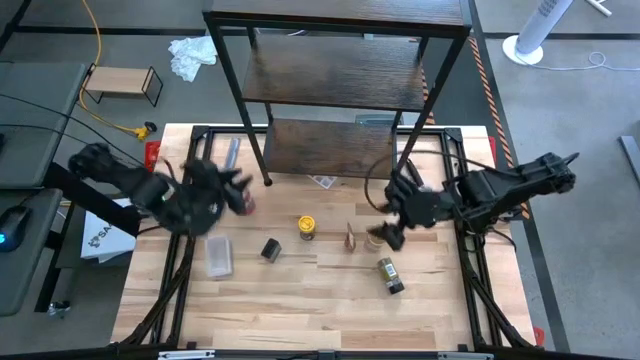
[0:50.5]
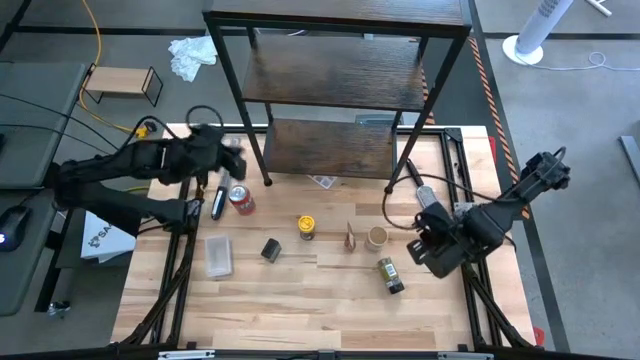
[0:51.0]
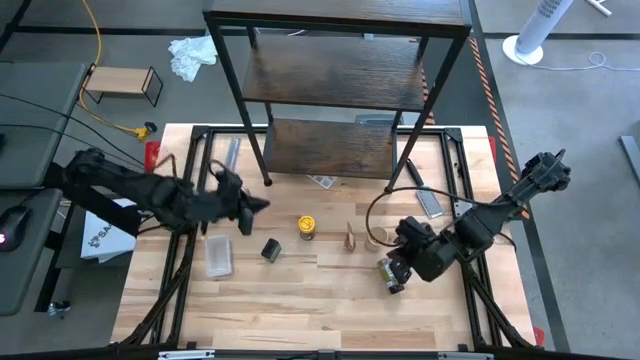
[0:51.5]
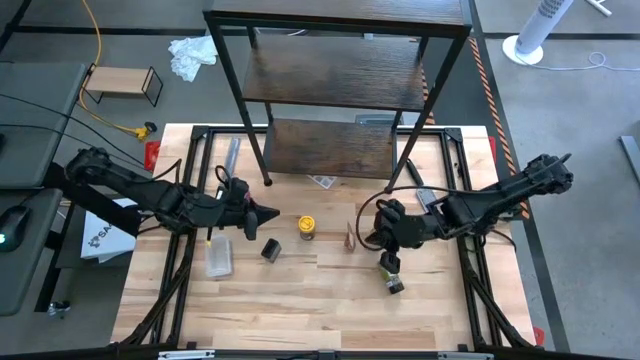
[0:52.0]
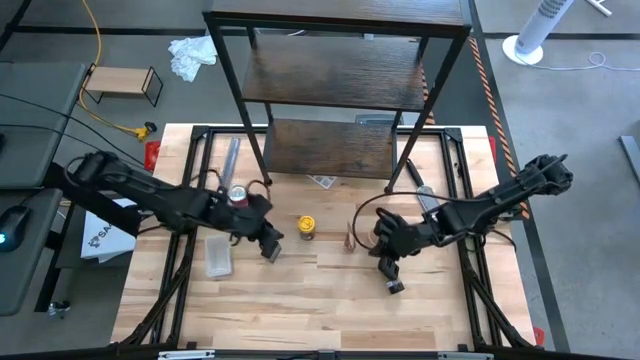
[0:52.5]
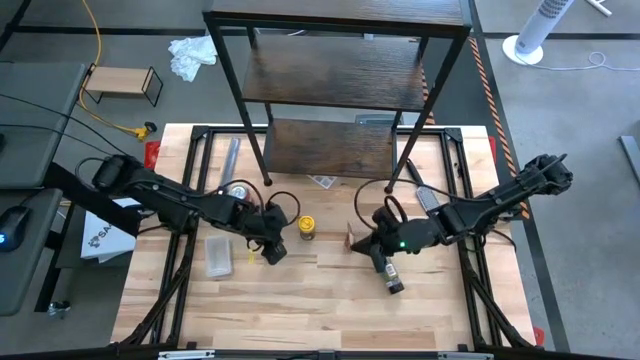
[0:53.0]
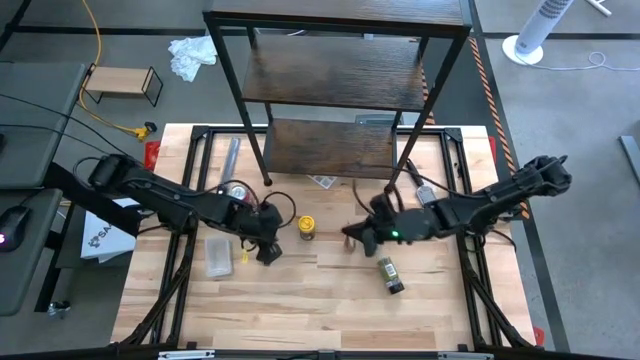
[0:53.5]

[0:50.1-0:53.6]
Task: Shelf spices
Adjust the black seasoning box

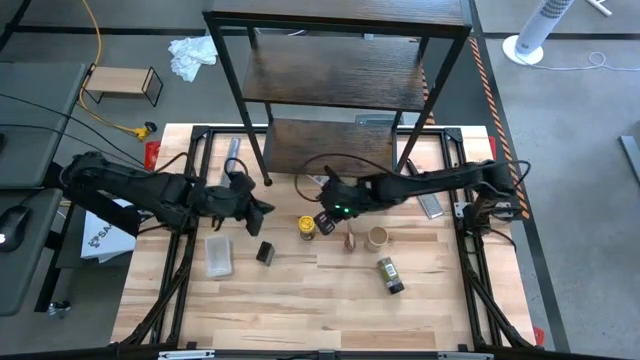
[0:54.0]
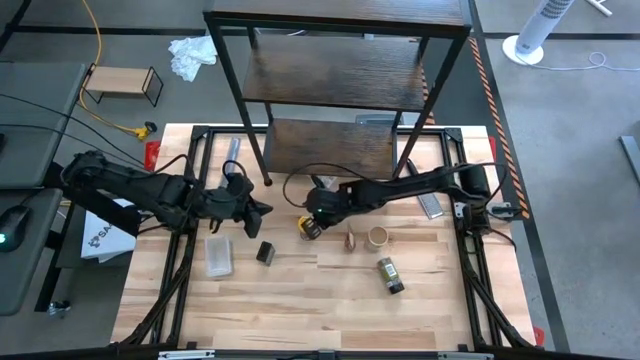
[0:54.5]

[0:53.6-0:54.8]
Adjust the yellow seasoning bag

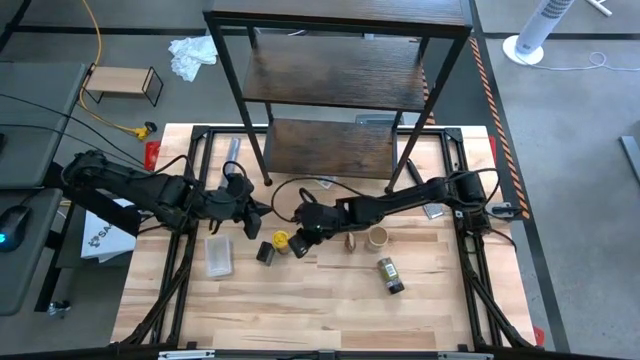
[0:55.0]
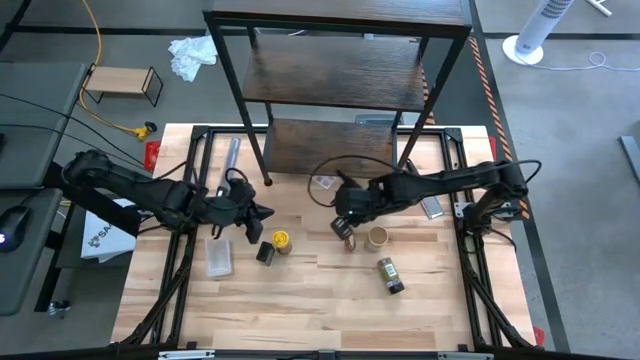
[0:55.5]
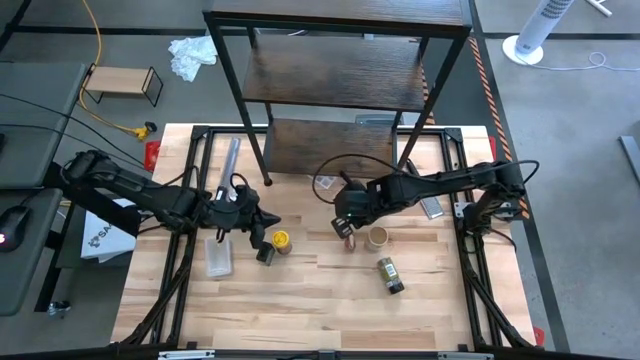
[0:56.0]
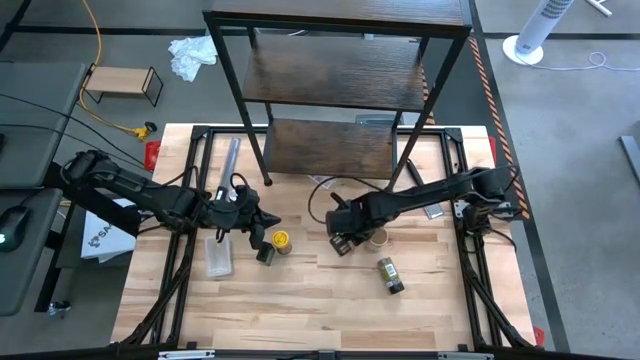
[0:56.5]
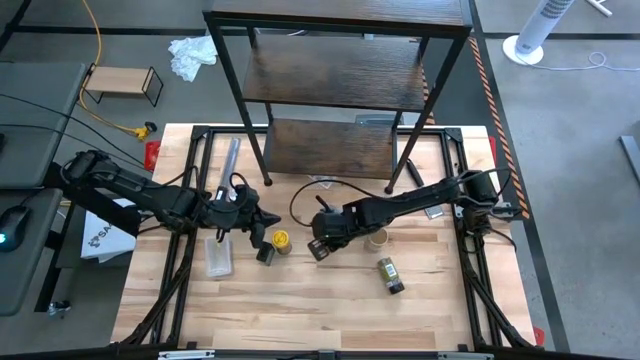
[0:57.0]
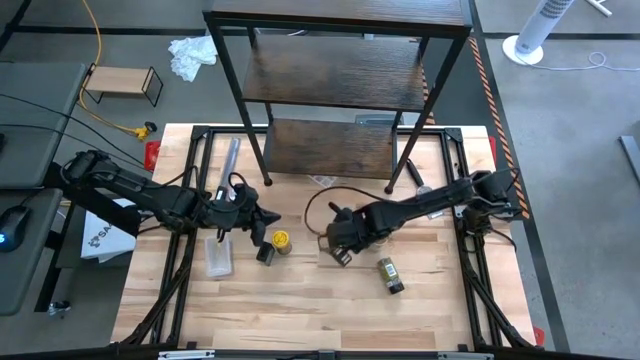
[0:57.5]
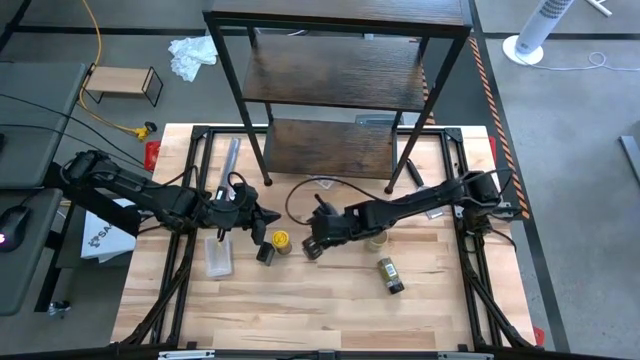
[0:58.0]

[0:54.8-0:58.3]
Adjust the seasoning bag

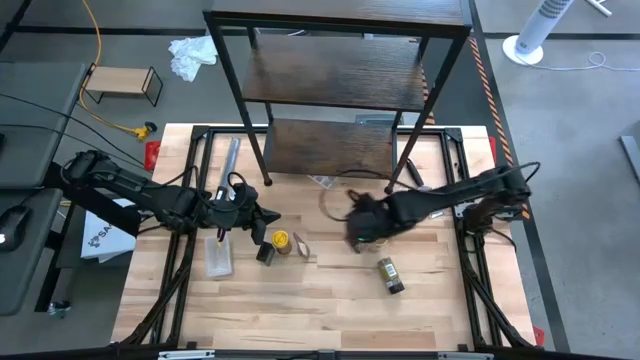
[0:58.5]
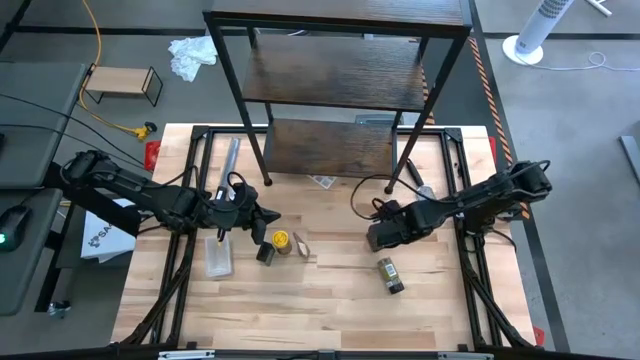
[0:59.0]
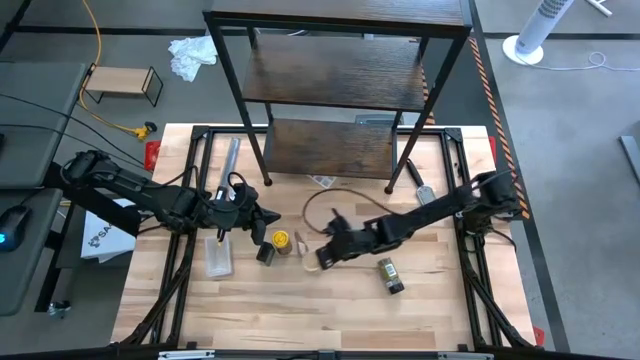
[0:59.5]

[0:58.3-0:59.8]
Move the brown seasoning bottle to the middle left of the table

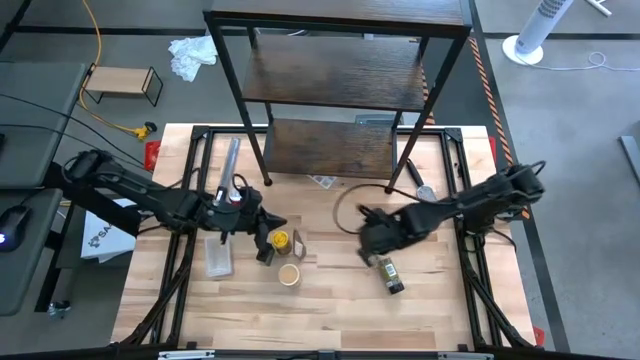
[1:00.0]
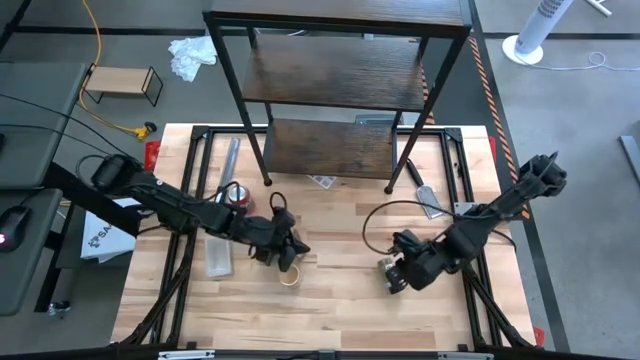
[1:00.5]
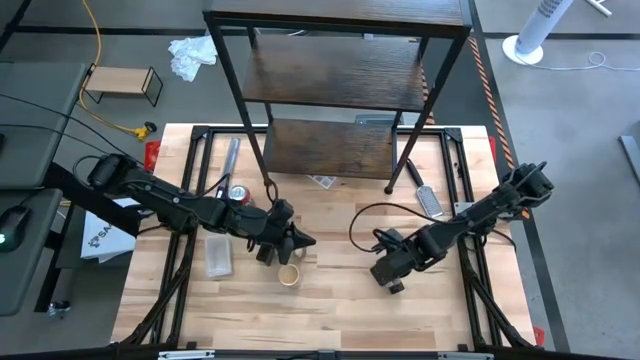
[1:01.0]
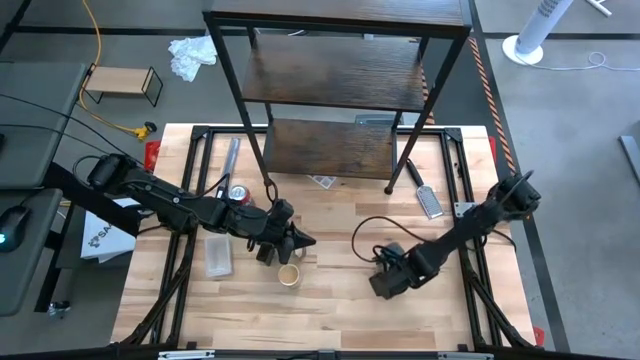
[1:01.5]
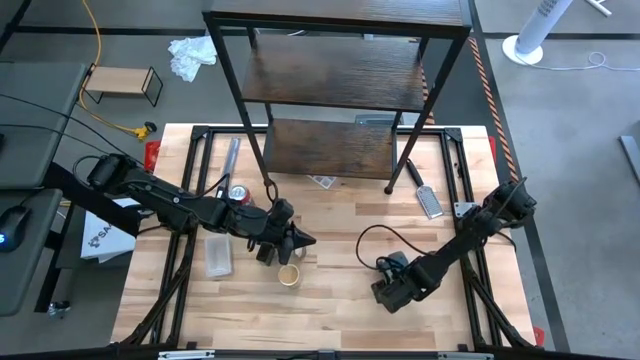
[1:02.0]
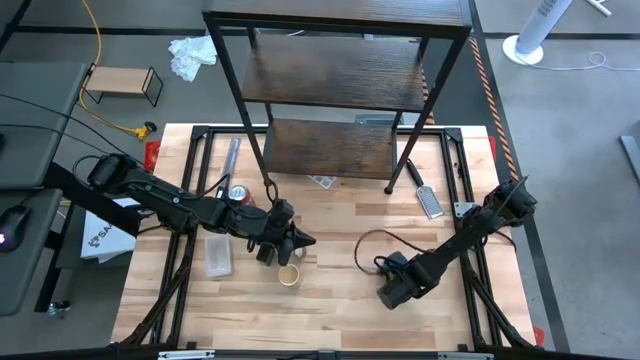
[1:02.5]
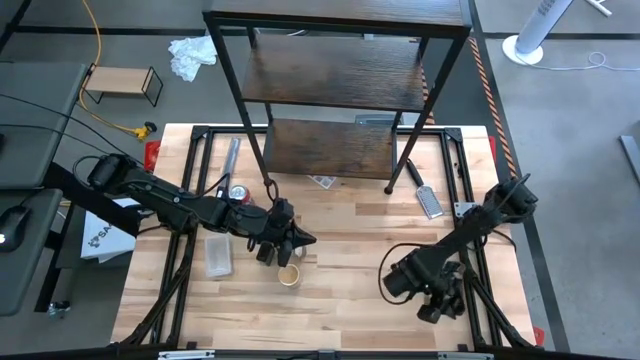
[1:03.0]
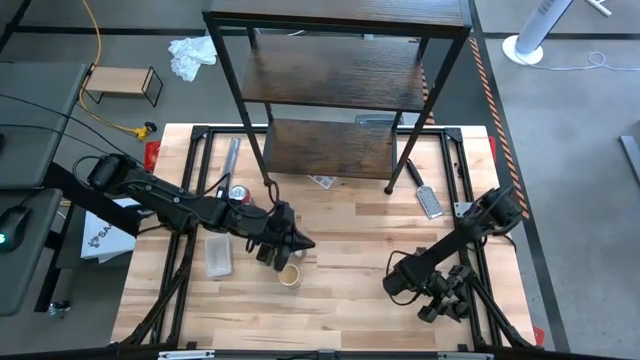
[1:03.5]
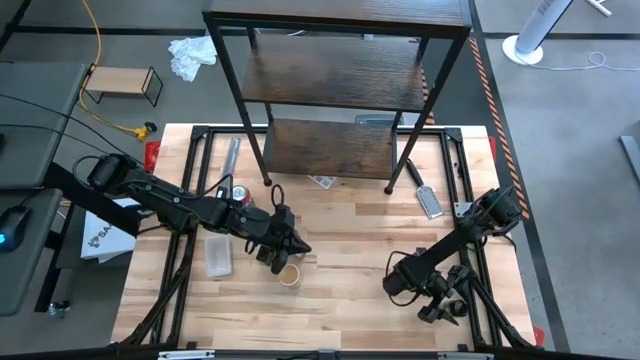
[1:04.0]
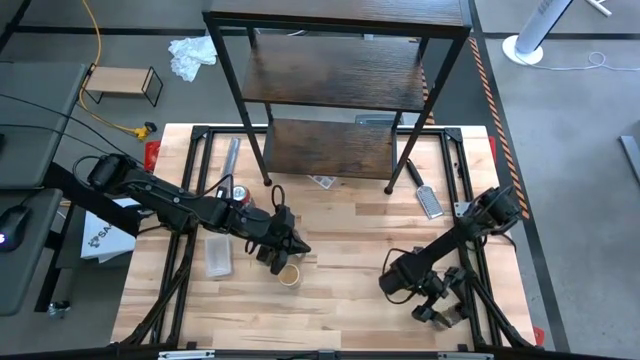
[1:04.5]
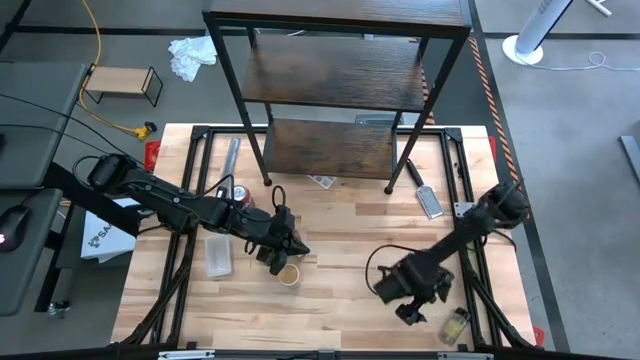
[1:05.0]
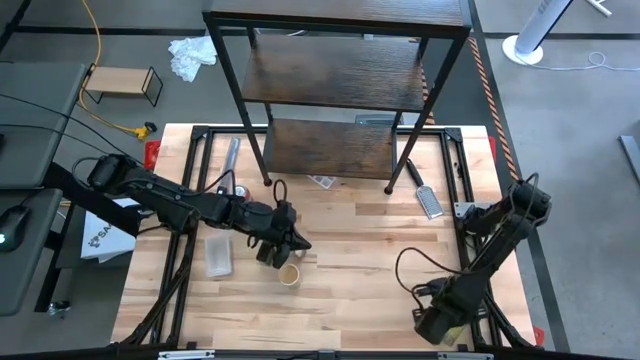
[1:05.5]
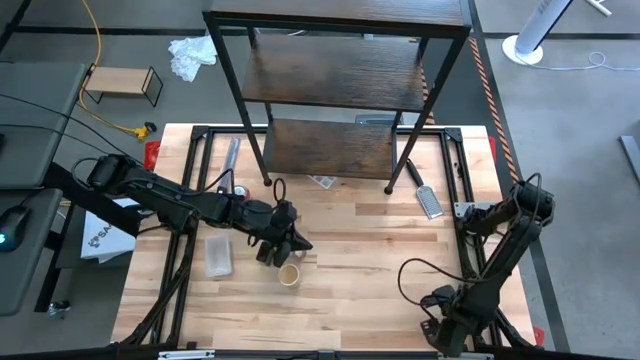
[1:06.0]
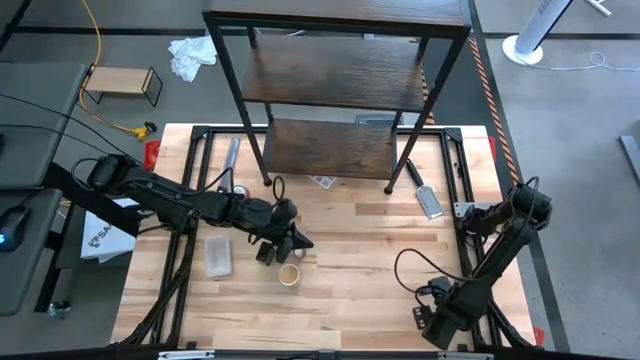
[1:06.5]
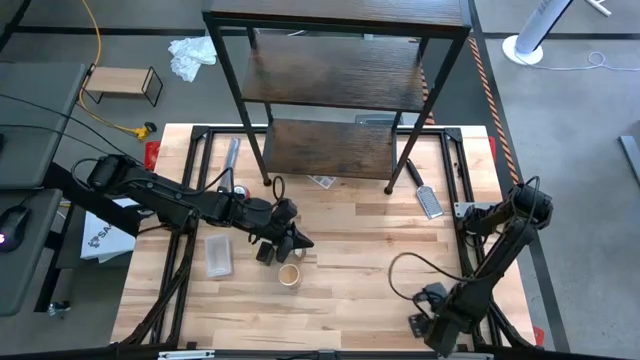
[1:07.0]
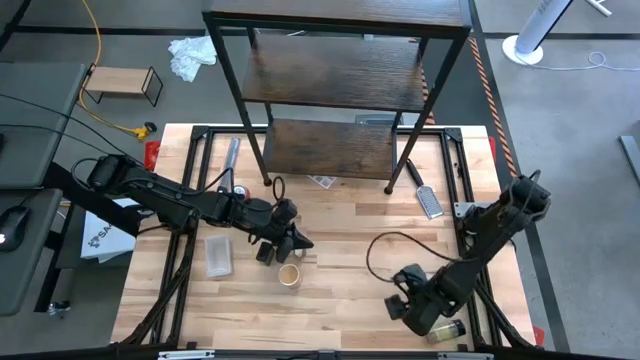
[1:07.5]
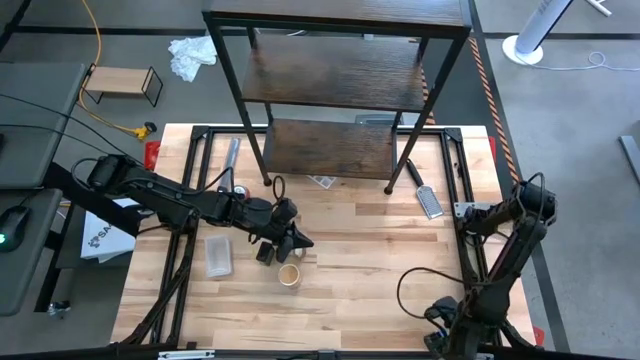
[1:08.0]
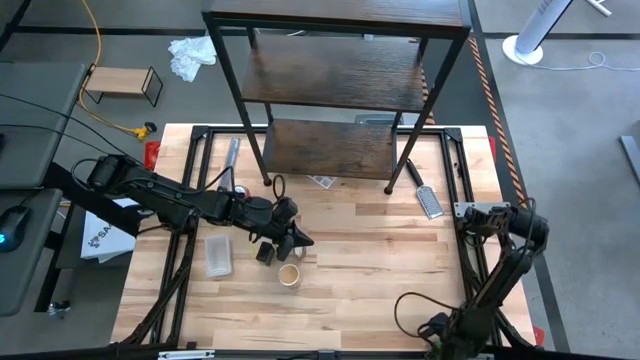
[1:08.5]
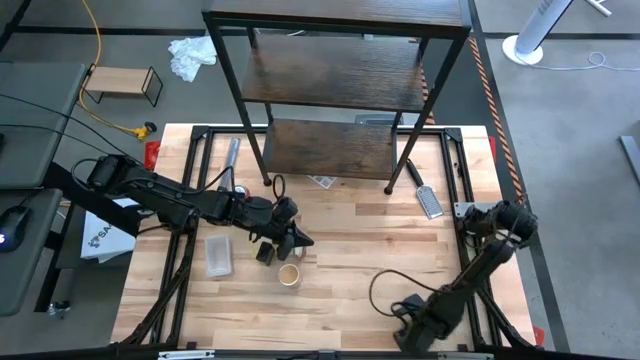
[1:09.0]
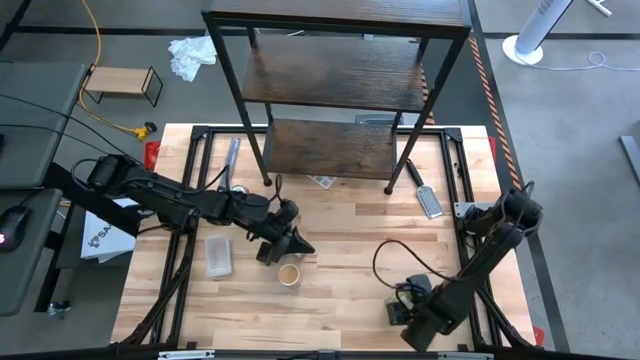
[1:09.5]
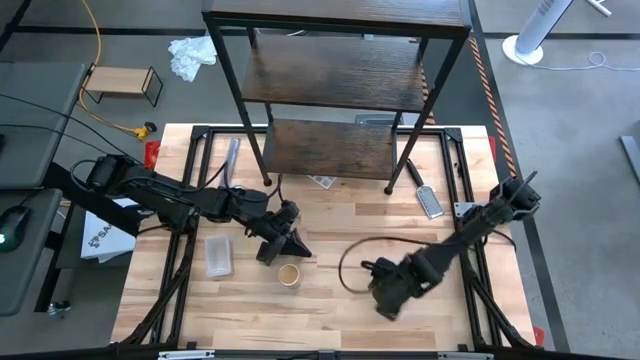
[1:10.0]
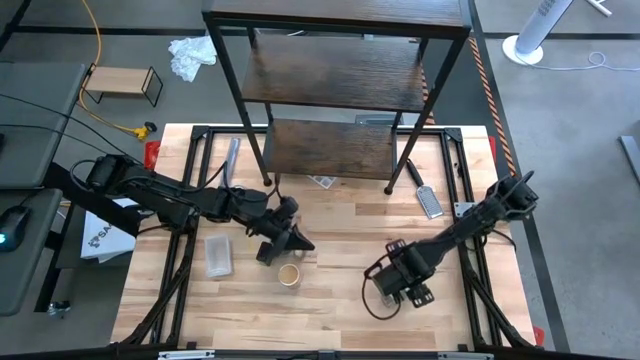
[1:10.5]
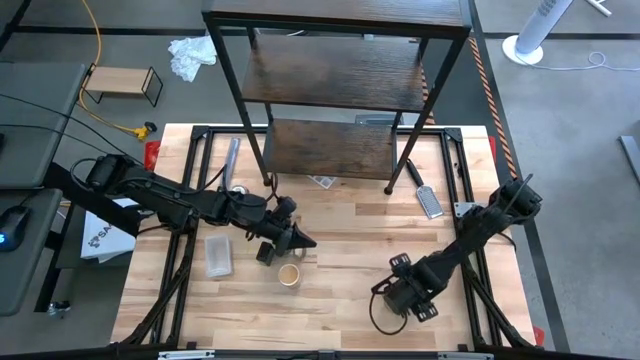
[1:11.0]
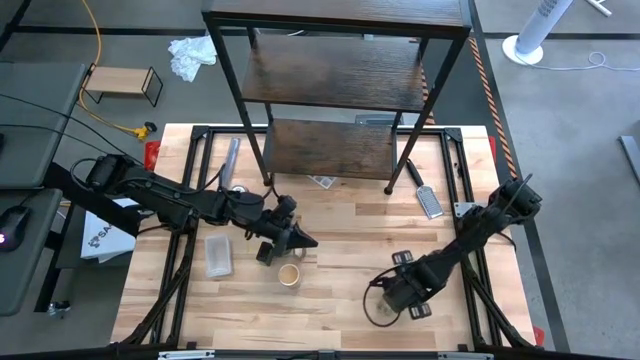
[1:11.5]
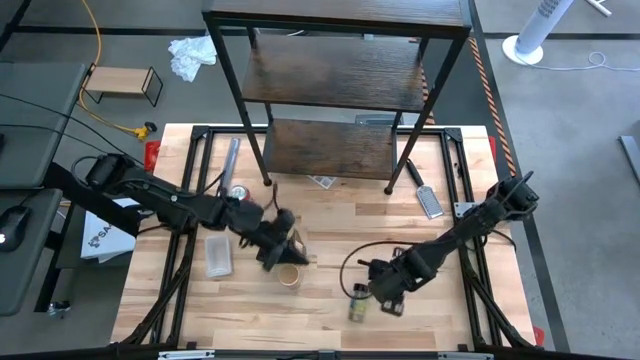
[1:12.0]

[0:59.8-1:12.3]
Adjust the black seasoning bottle
